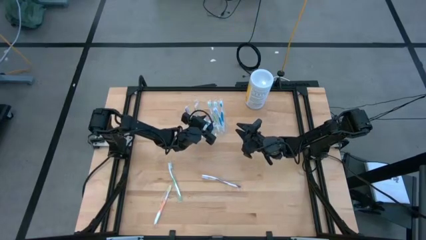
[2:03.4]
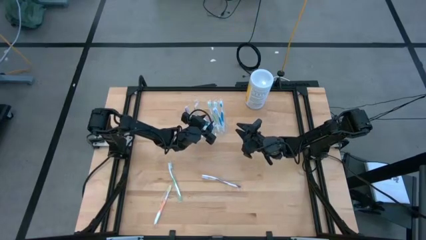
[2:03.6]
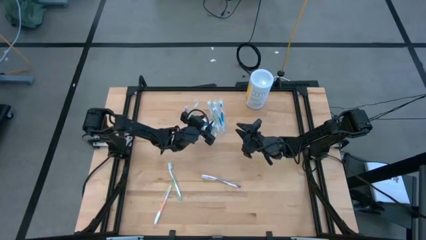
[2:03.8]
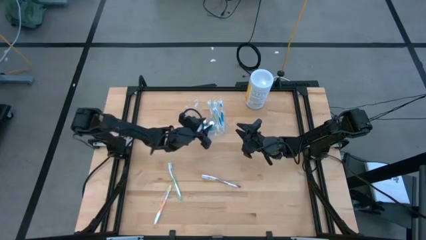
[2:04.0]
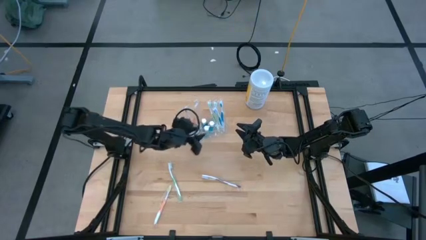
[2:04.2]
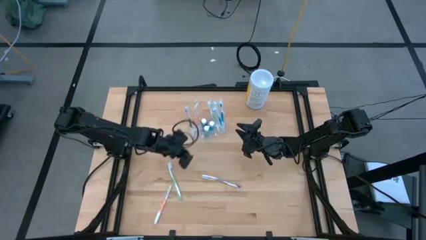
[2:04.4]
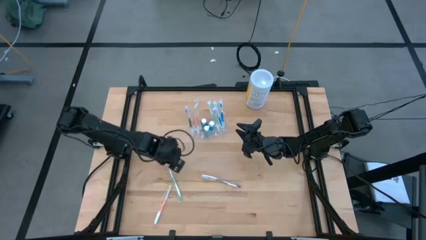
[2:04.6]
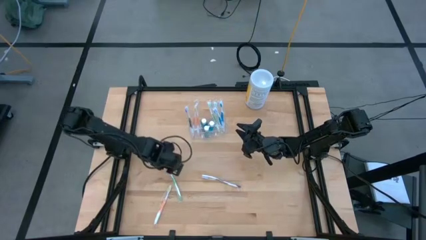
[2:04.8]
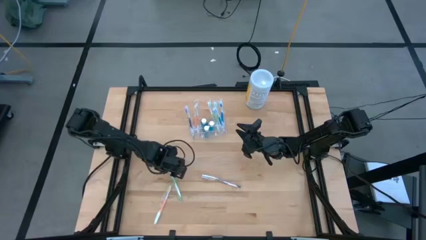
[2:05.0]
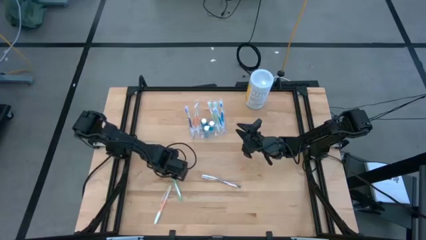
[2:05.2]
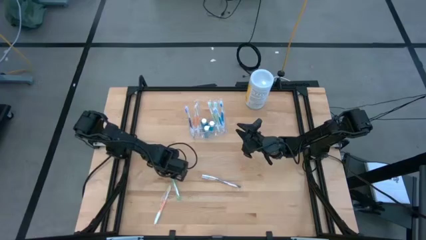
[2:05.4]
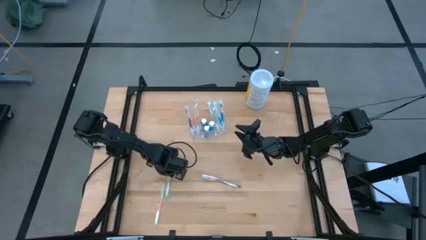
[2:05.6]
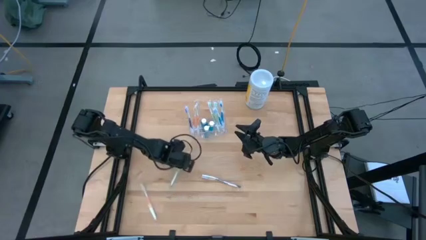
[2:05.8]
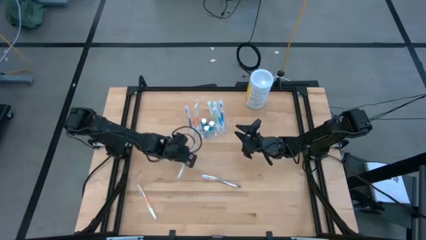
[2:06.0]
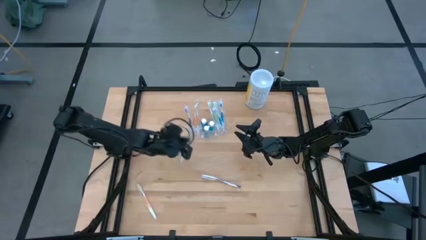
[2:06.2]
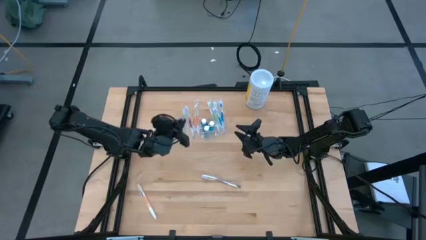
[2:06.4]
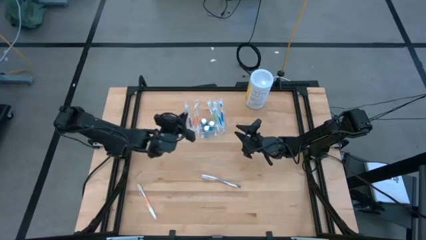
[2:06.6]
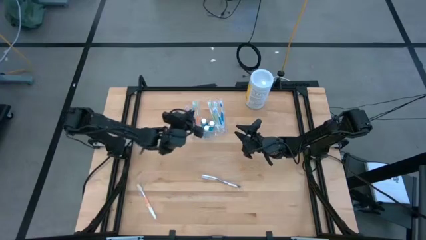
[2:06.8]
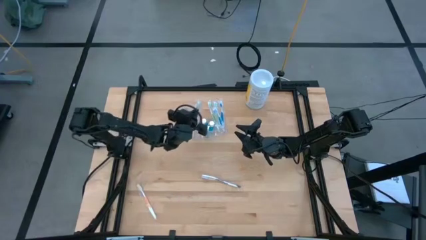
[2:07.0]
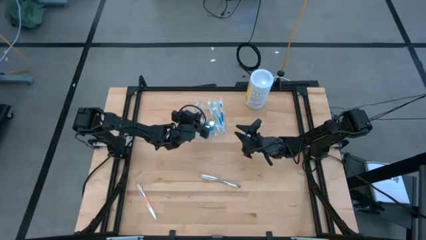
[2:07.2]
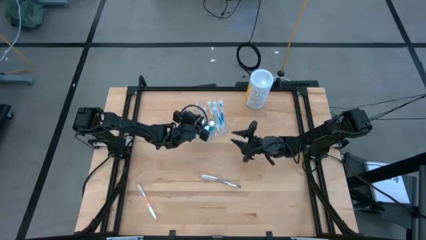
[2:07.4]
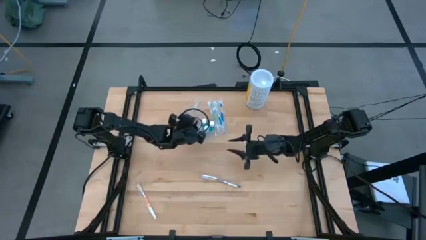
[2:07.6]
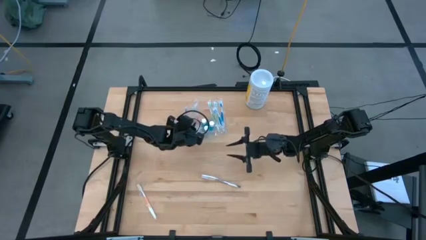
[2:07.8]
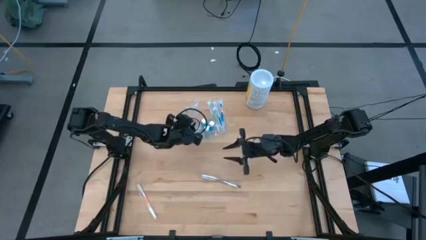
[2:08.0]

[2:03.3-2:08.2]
Task: Pick & Place toothbrushing station
Put the green toothbrush into the transparent organizer

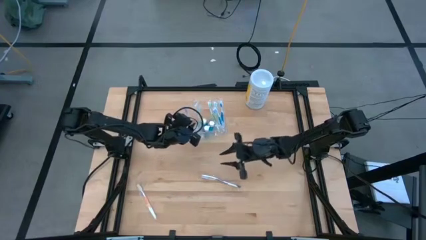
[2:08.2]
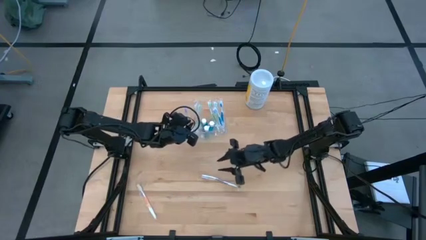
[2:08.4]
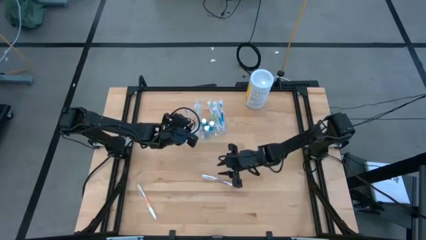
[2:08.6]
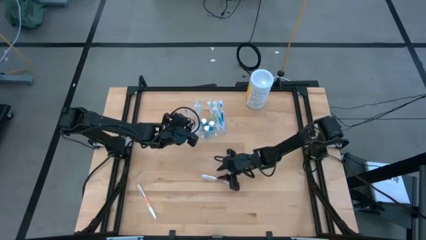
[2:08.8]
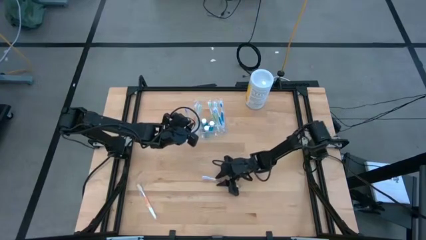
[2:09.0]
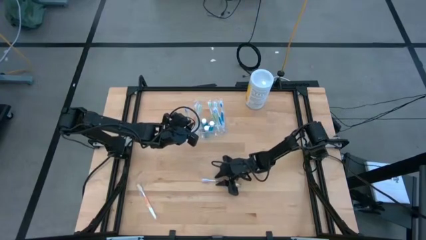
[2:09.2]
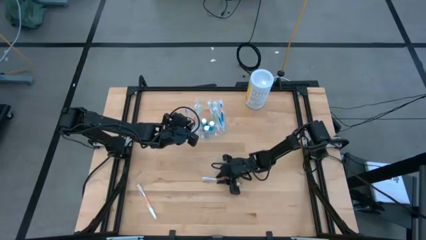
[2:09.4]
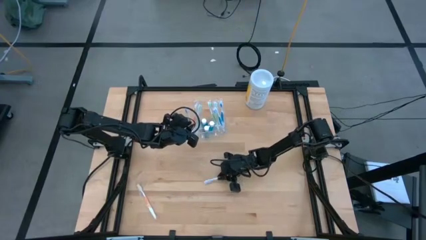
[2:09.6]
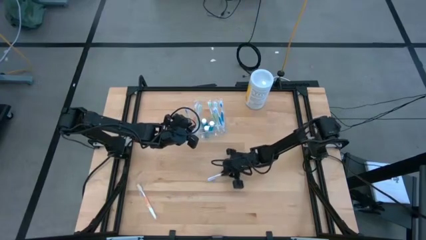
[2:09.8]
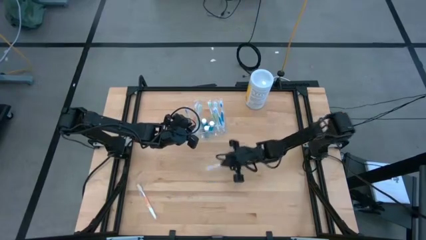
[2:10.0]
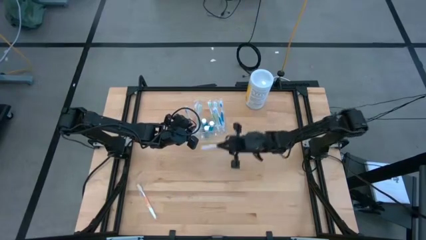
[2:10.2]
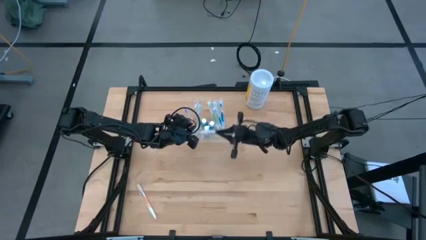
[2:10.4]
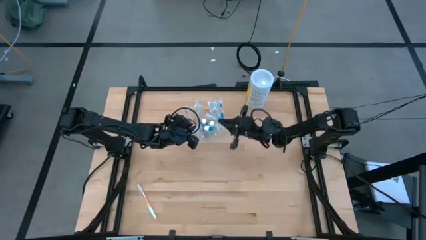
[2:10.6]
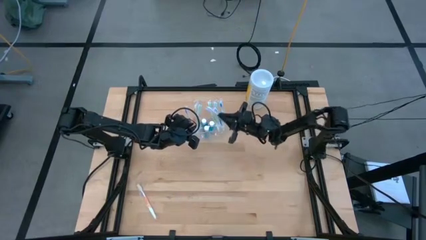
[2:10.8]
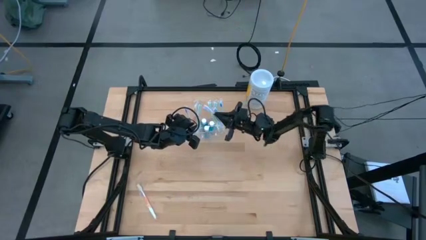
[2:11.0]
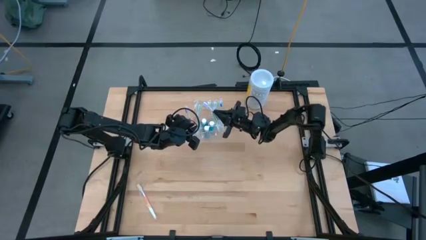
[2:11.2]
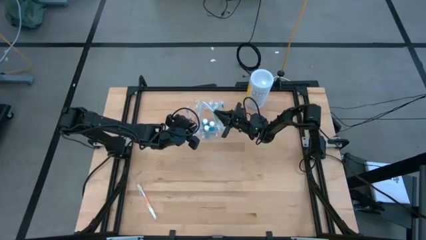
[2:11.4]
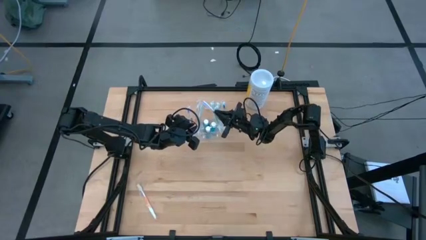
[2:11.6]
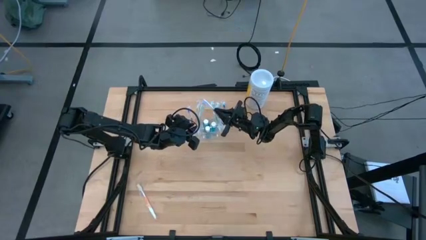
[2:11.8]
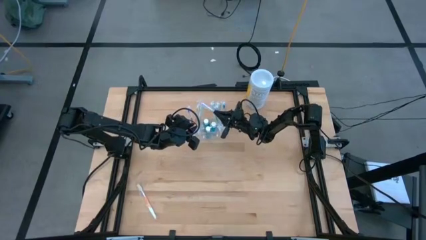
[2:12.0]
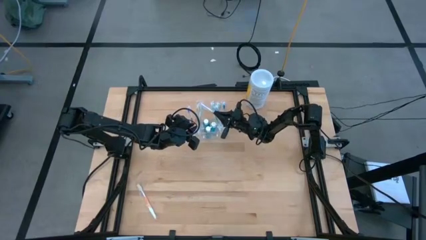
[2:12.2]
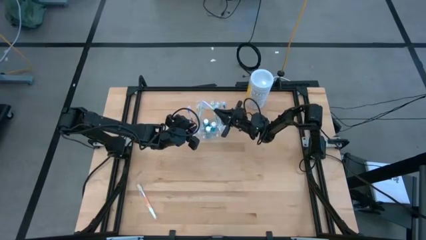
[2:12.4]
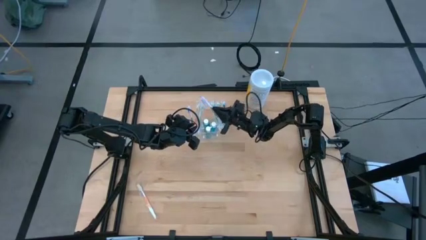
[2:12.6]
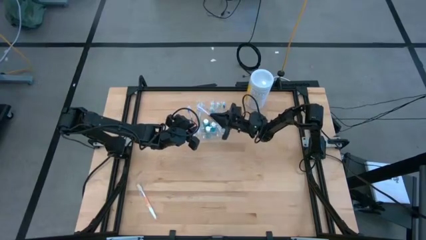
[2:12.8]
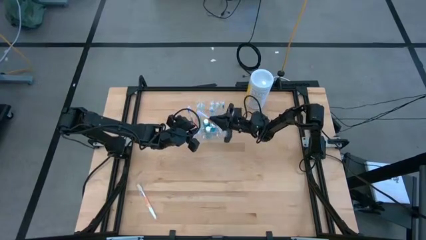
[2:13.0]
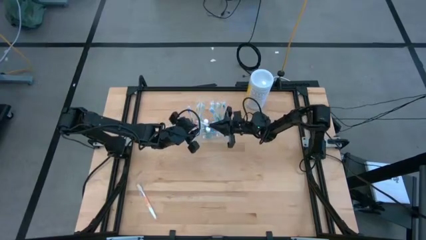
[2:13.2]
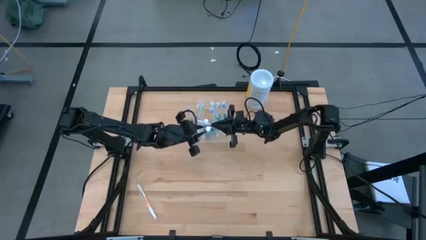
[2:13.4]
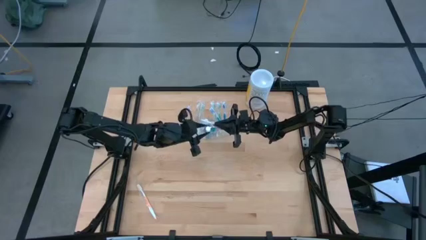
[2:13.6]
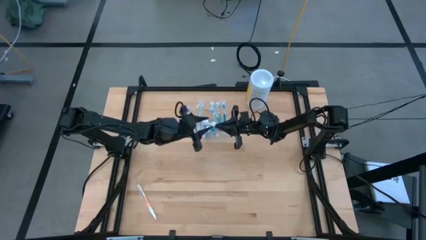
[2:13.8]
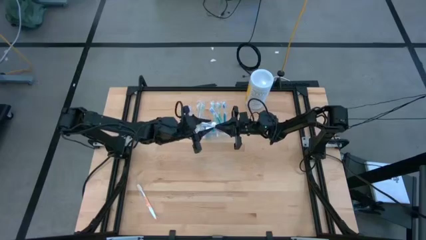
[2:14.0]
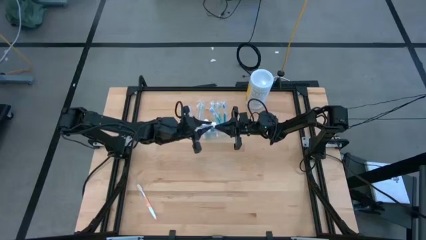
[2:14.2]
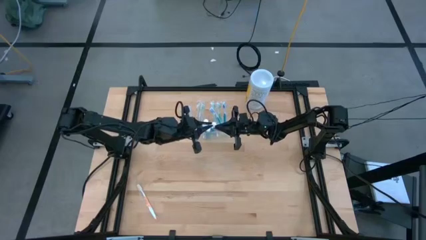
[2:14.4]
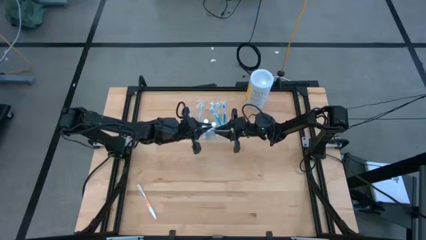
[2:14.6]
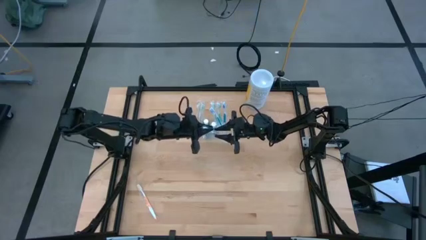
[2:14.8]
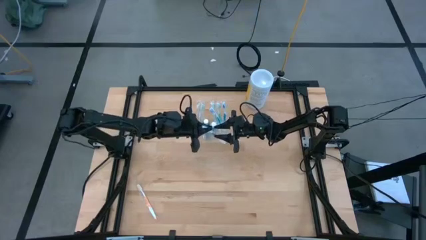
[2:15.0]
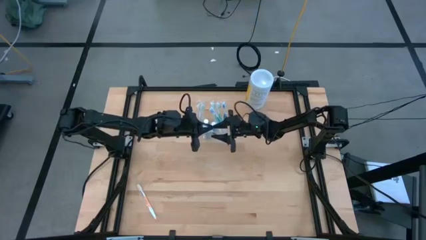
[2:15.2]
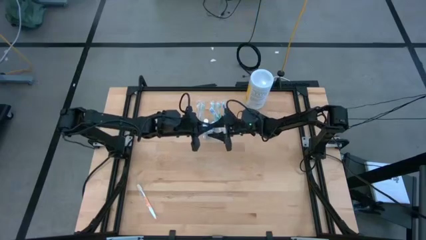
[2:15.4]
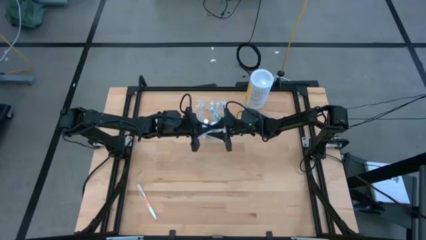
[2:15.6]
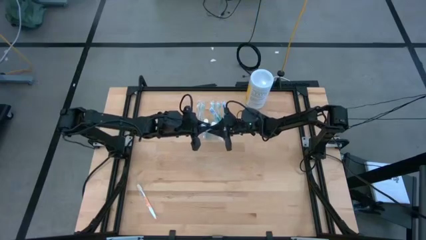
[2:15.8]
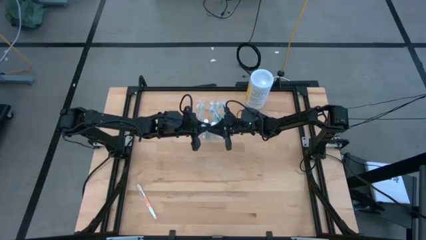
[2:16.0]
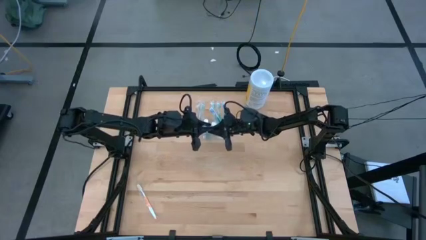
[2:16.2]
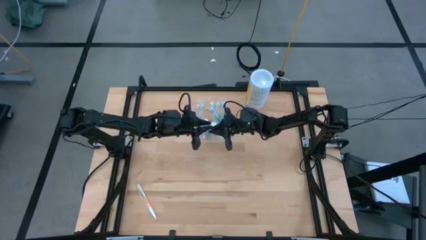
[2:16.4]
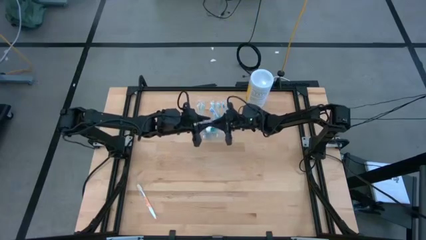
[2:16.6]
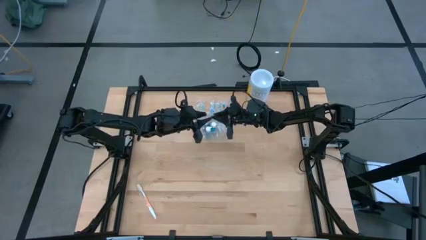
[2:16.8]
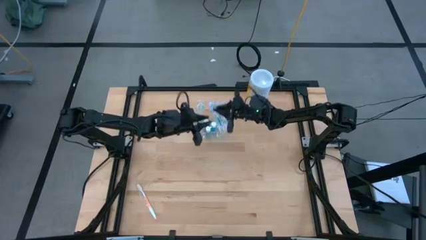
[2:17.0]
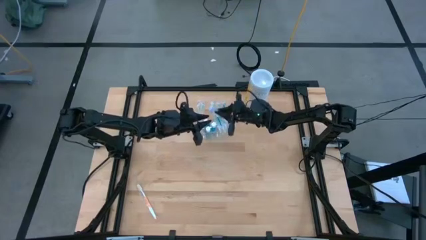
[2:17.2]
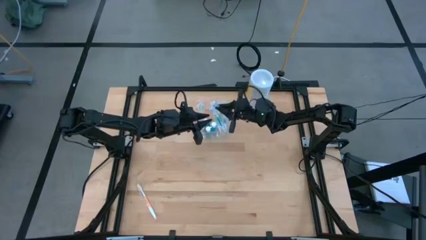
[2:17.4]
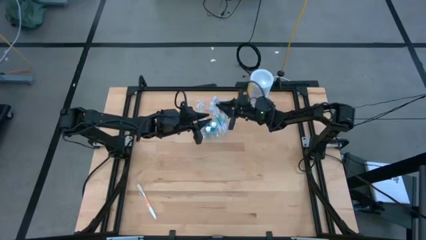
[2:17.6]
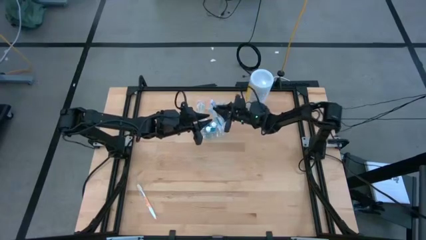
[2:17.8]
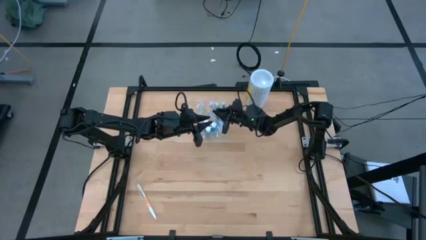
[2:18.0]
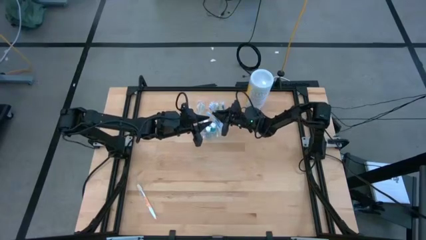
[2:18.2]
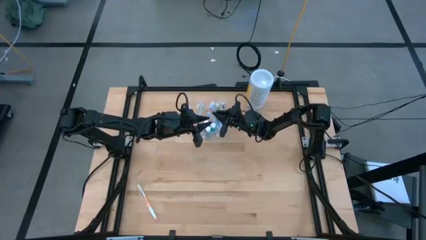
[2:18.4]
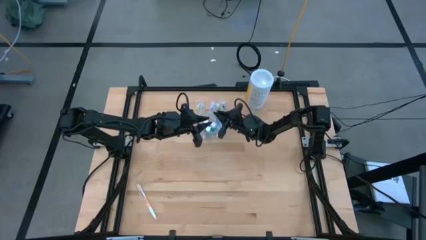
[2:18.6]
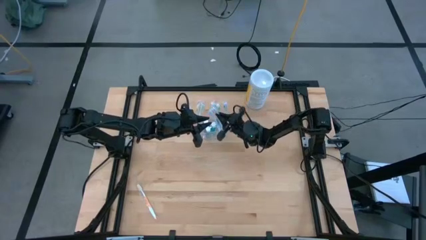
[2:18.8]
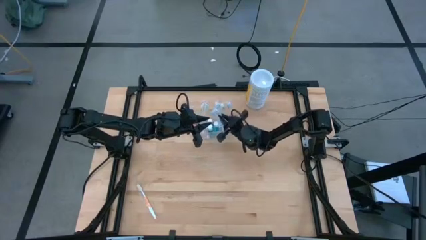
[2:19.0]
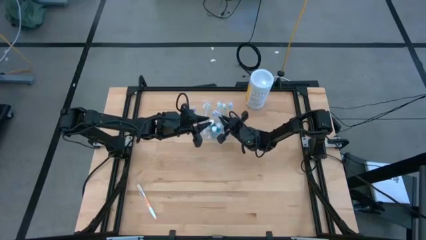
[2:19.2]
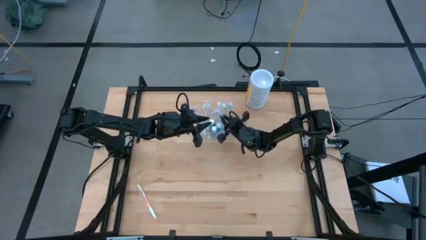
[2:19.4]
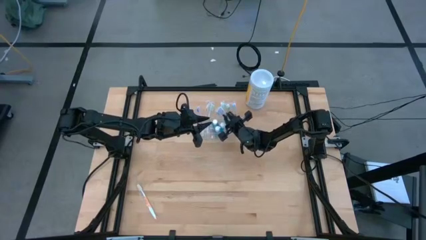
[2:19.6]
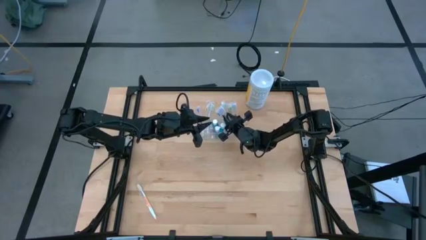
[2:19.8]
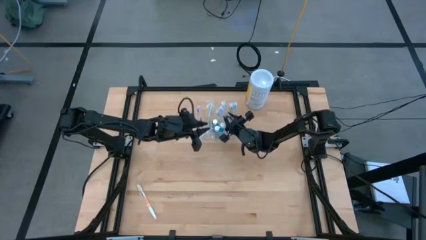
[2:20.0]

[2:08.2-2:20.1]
Put the purple toothbrush into the transparent organizer
